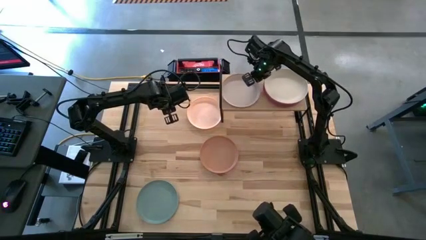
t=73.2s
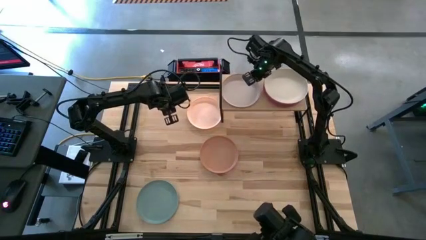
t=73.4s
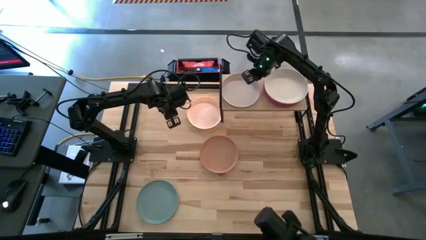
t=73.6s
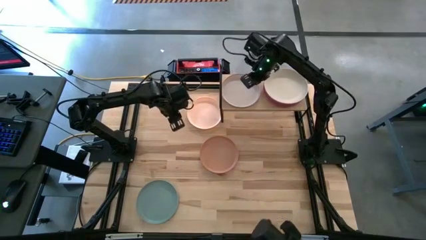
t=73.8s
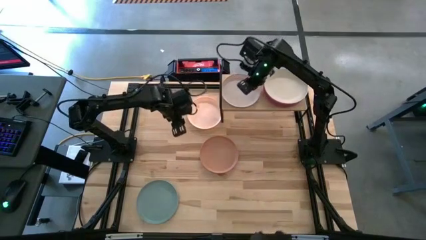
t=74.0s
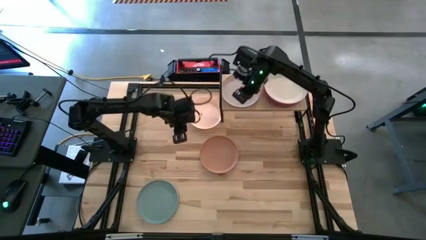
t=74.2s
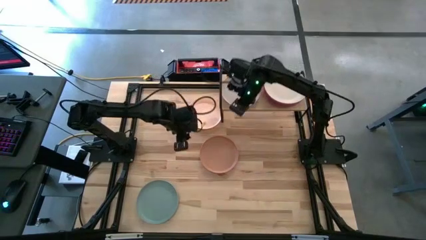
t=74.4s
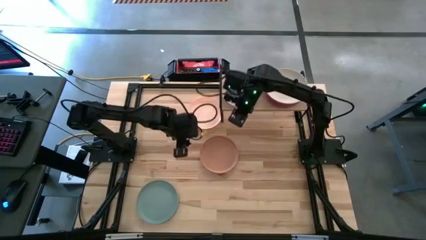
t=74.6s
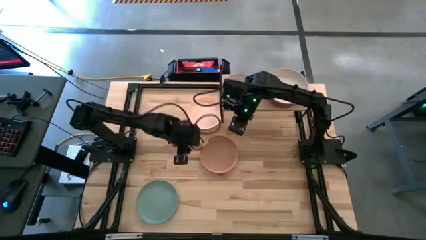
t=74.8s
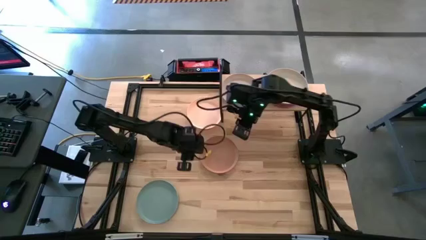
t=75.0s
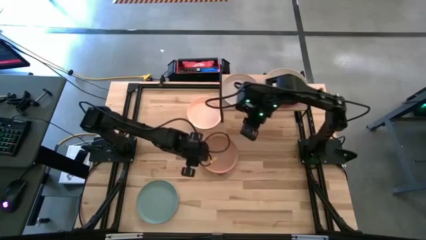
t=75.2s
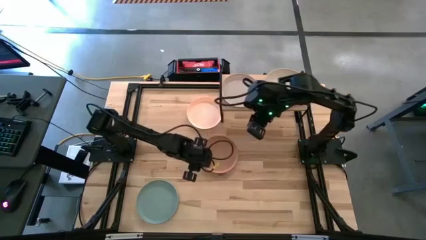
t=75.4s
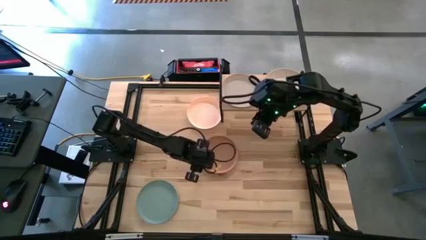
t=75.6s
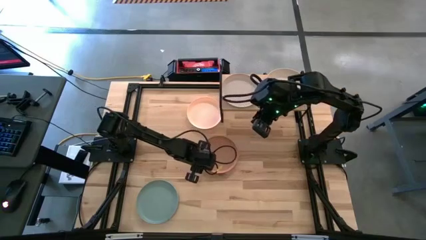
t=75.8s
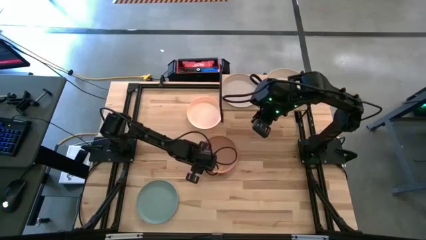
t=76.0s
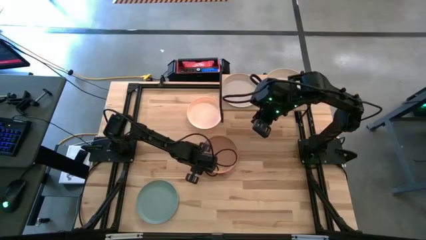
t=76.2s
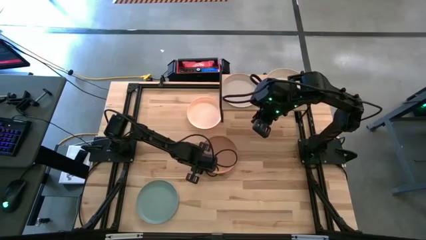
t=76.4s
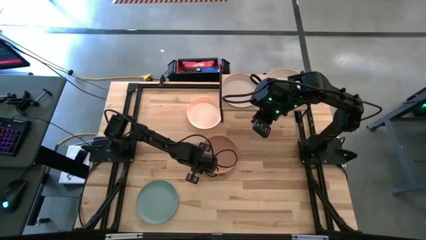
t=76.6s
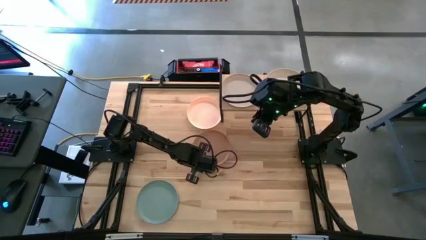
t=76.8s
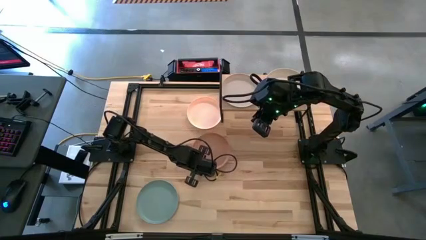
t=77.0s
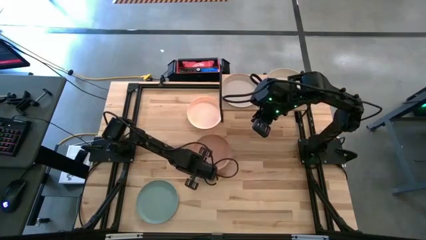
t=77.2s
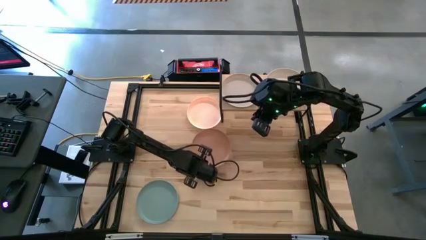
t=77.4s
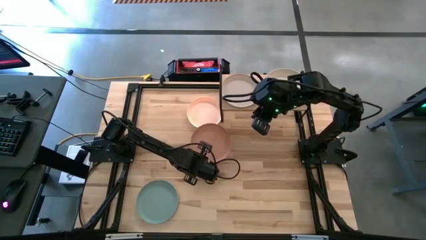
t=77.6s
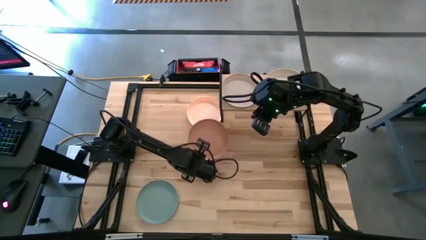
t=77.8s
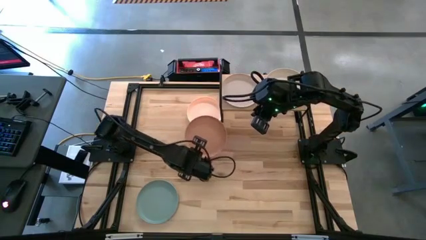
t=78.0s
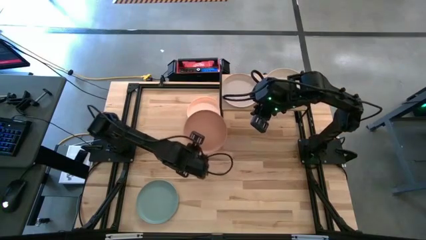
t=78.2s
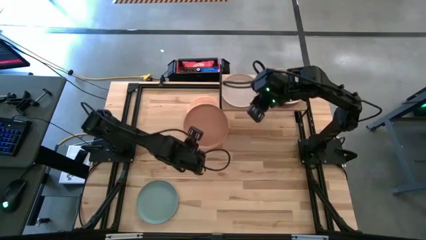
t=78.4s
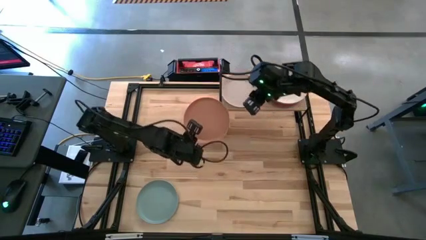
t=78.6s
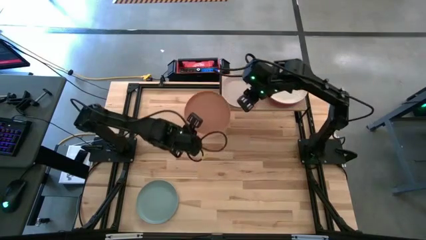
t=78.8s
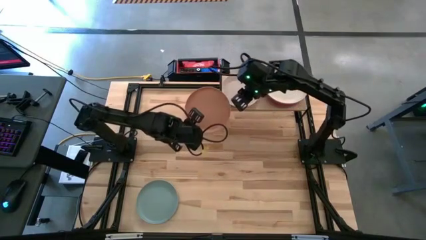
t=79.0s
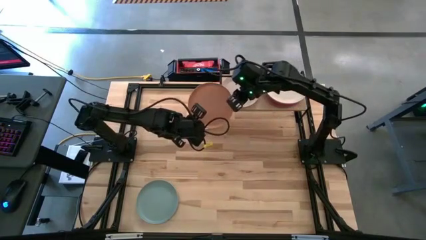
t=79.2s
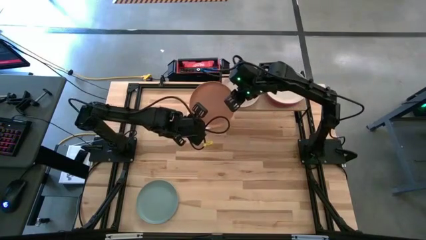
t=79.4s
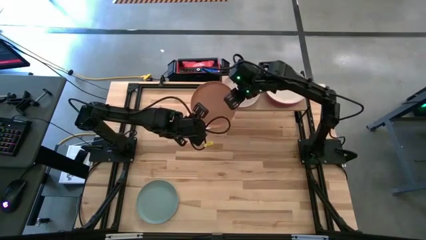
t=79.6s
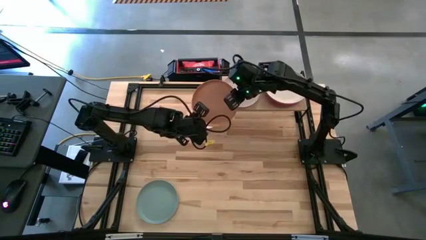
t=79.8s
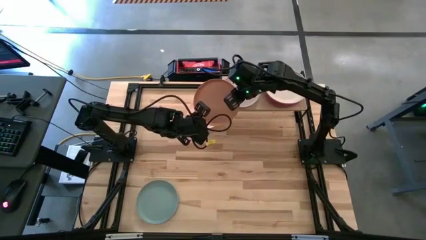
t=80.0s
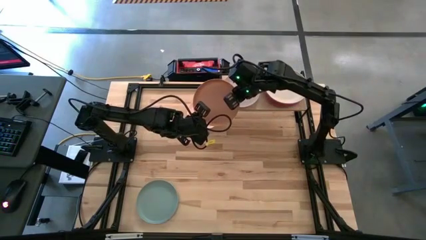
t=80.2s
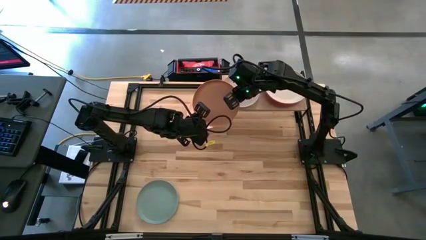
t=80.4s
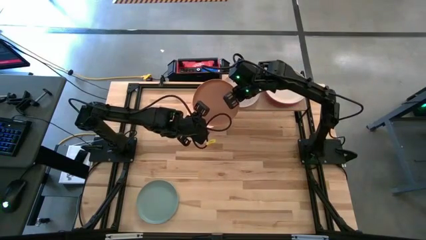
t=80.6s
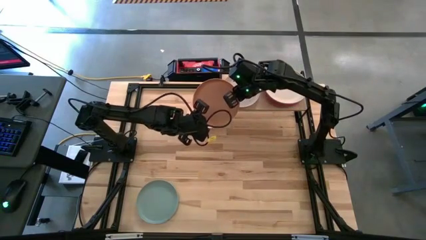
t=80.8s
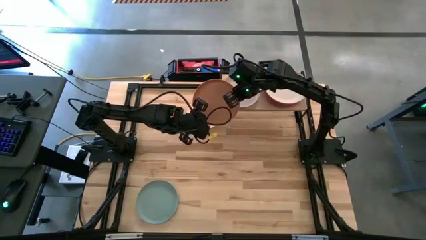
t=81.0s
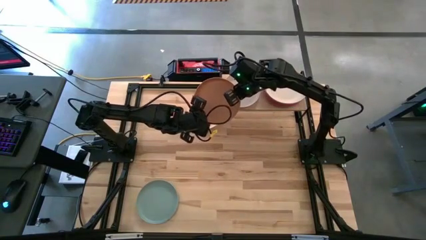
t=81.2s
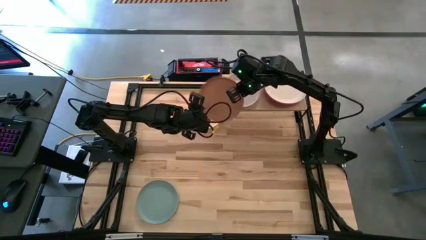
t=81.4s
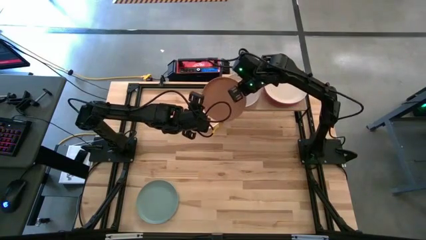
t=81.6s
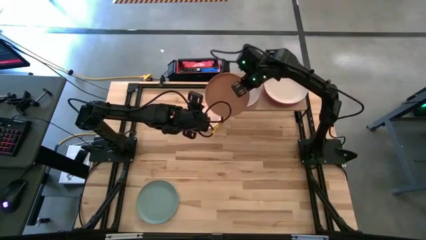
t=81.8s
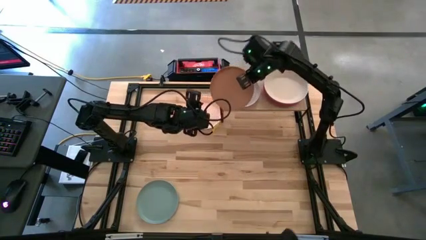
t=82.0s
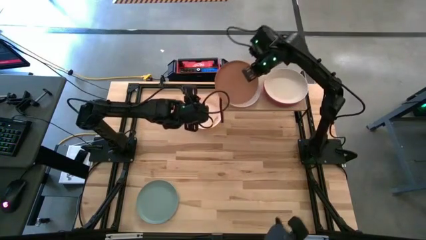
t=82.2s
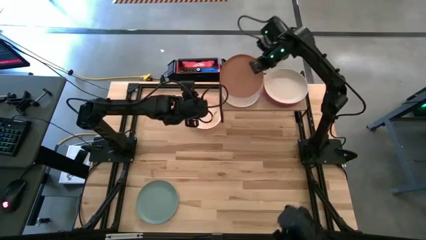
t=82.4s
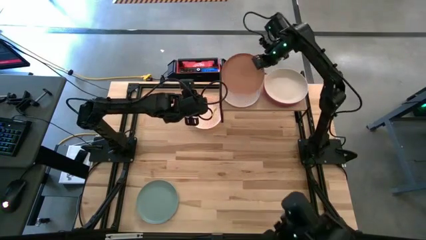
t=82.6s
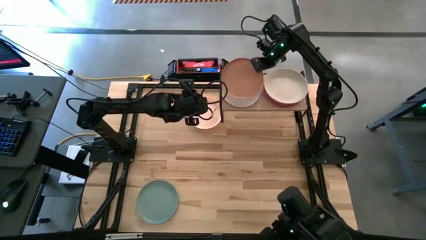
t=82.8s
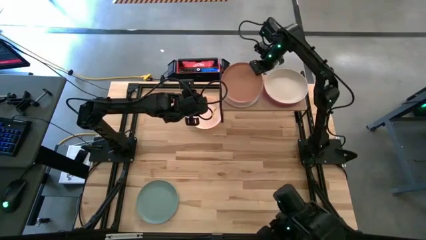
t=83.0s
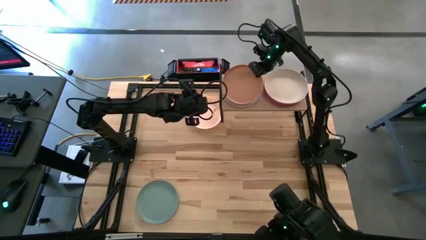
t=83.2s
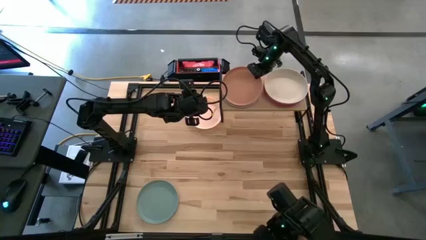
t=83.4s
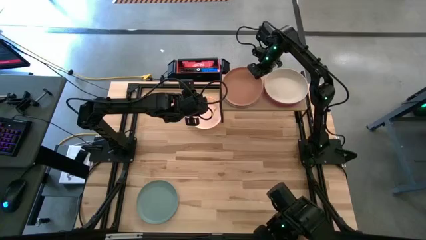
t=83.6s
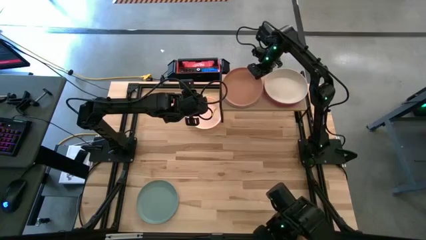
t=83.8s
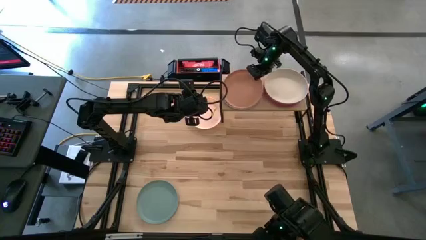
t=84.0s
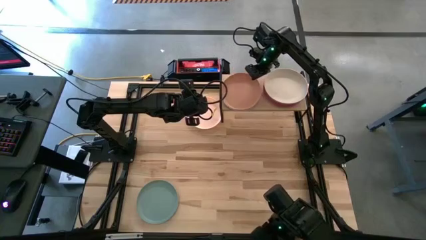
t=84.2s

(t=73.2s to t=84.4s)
Task: Place and stack plates onto a shelf
Stack the brown plate on top of the white plate

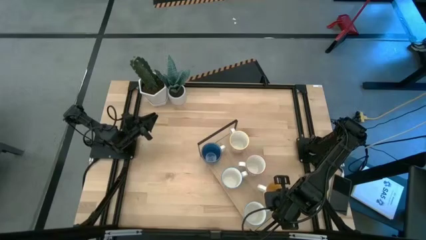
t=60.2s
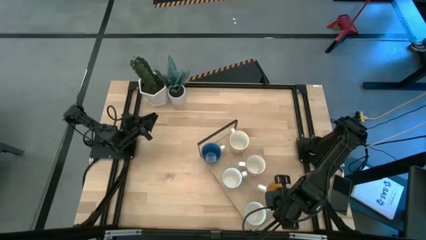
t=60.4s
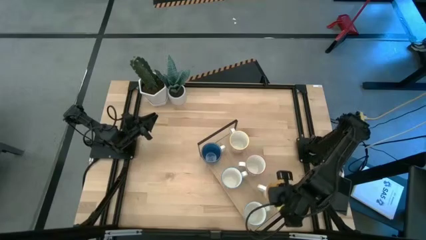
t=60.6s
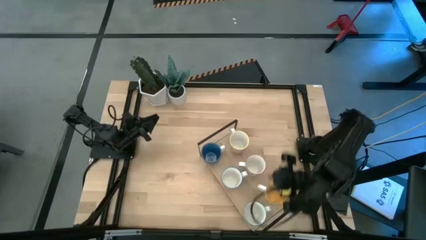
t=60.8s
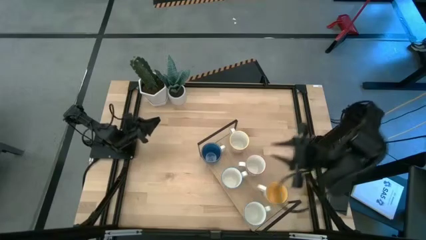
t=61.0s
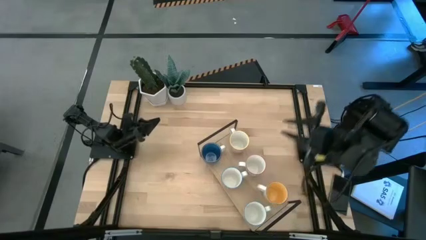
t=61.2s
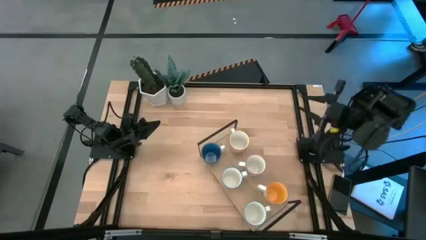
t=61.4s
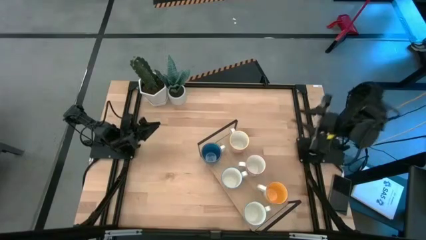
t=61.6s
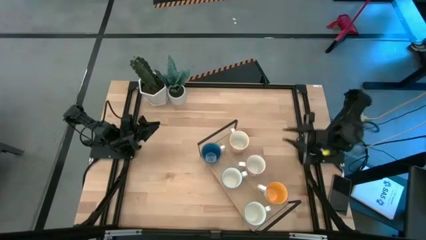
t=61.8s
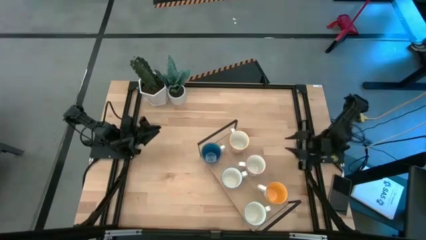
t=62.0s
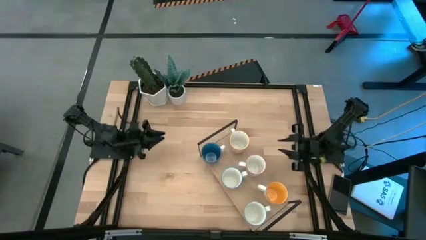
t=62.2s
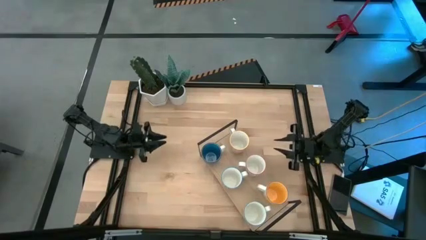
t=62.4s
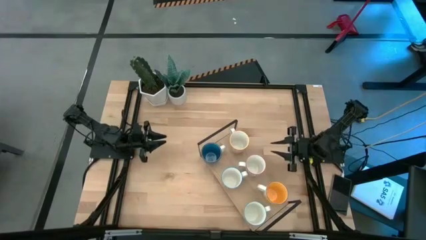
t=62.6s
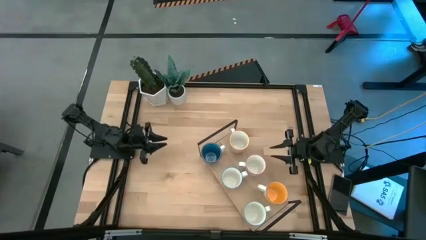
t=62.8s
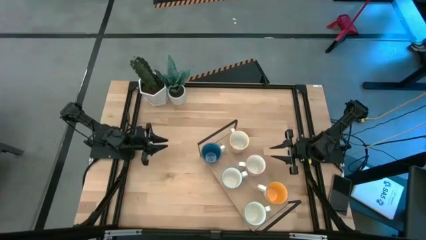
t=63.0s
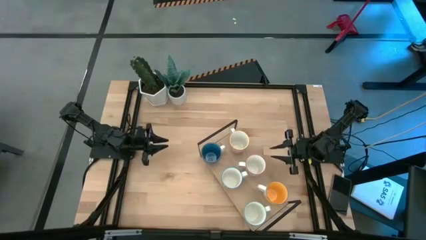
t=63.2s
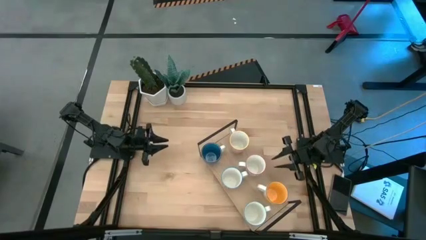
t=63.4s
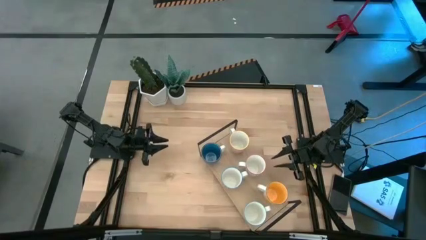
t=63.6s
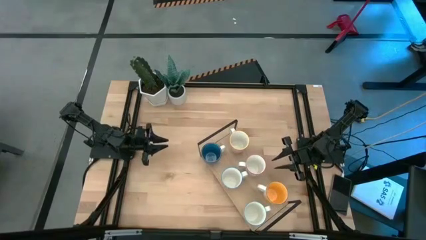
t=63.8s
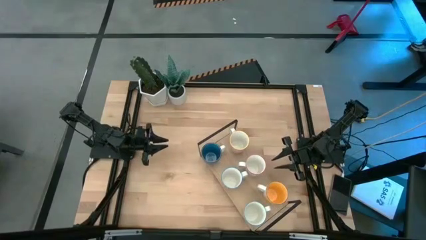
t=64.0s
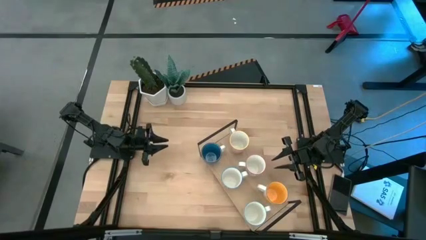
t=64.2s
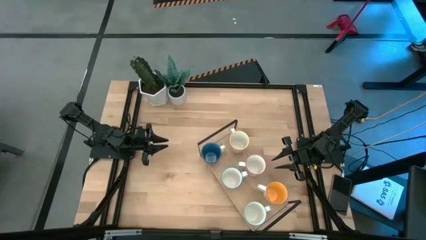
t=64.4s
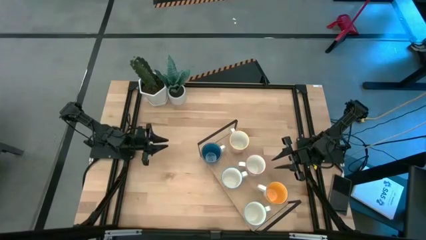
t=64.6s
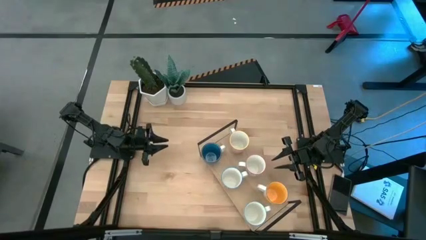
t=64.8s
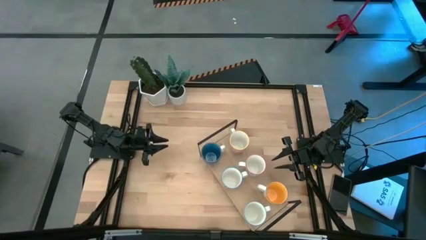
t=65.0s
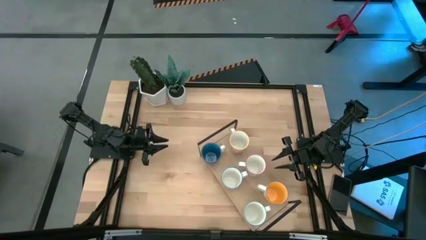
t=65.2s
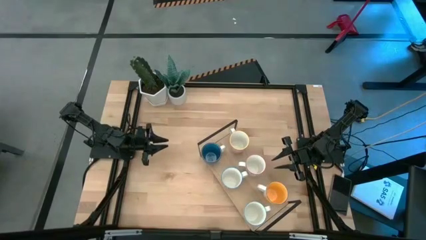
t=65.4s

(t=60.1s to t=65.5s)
Task: Place coffee mugs
Return to Home Position
